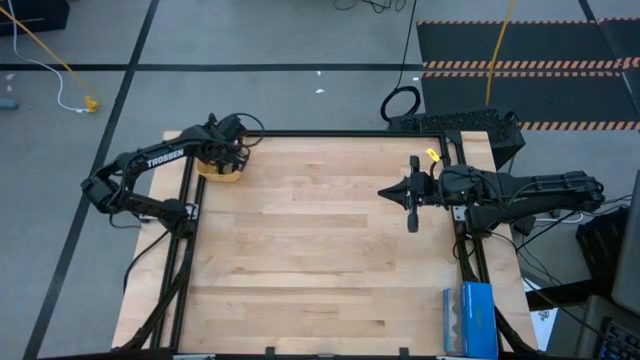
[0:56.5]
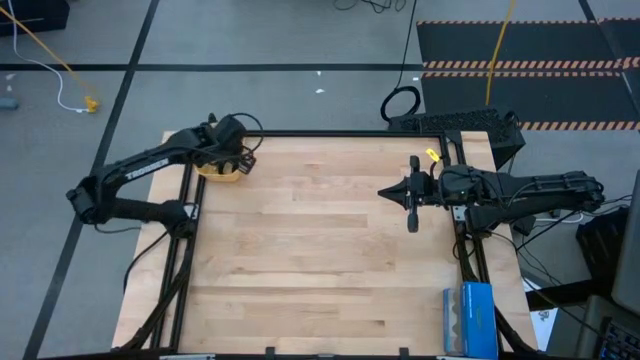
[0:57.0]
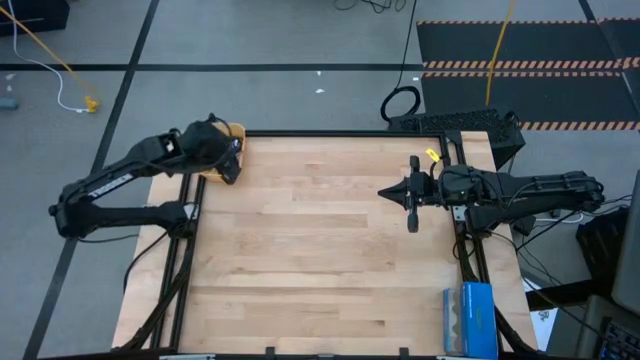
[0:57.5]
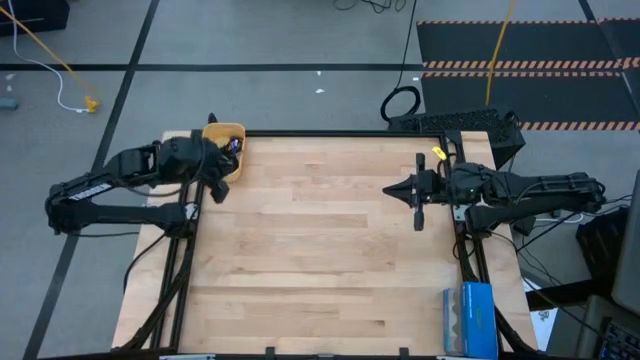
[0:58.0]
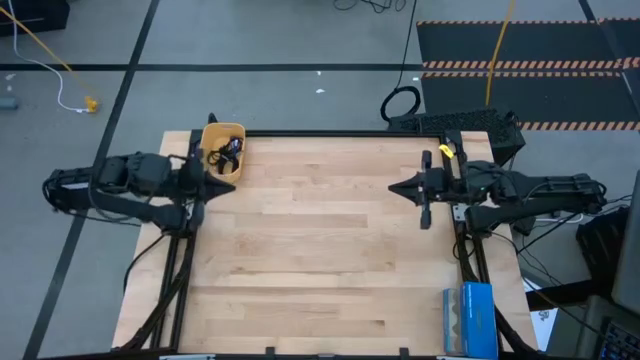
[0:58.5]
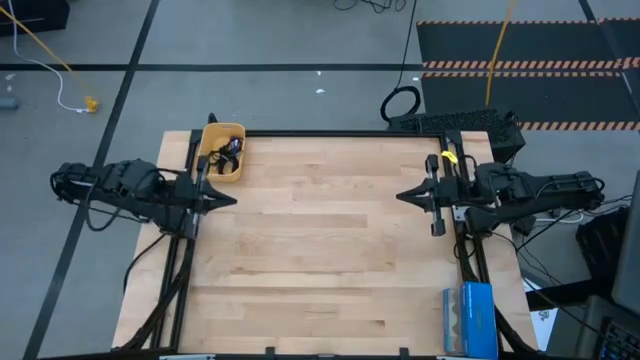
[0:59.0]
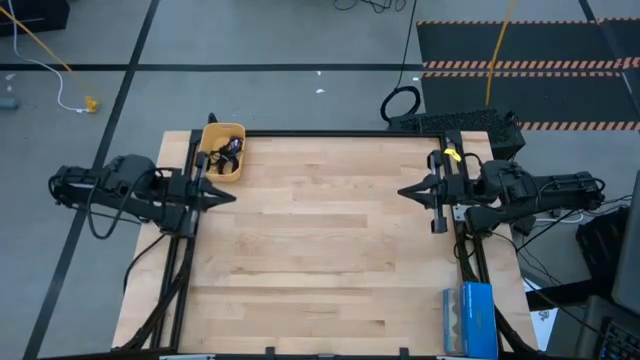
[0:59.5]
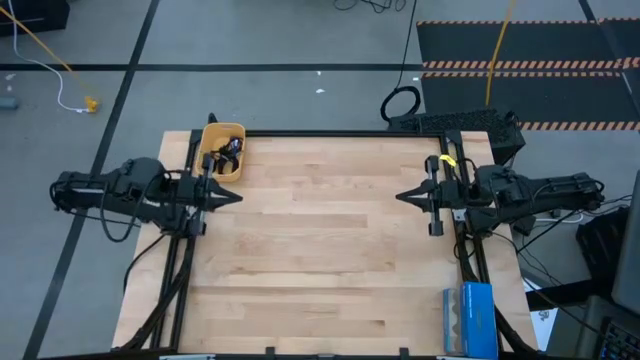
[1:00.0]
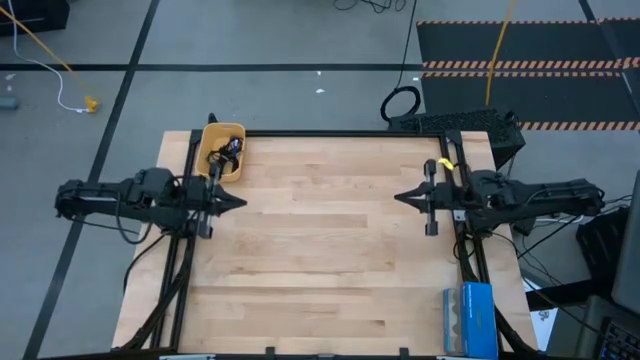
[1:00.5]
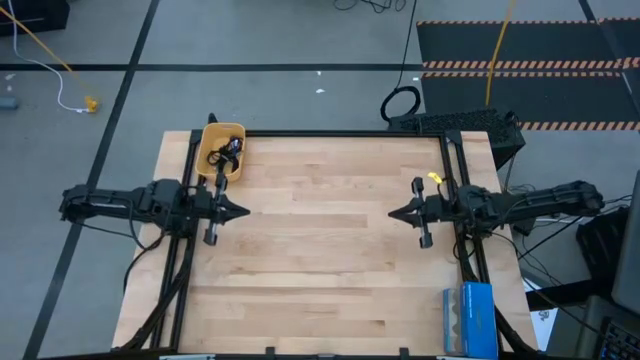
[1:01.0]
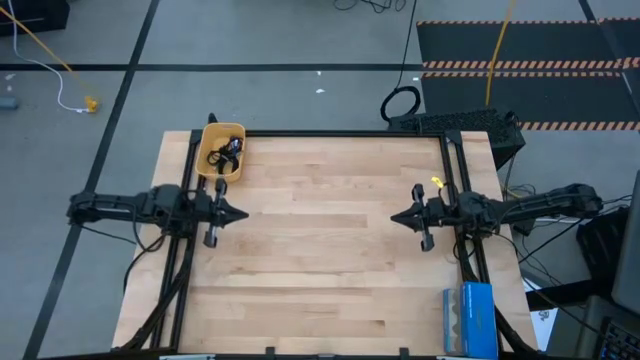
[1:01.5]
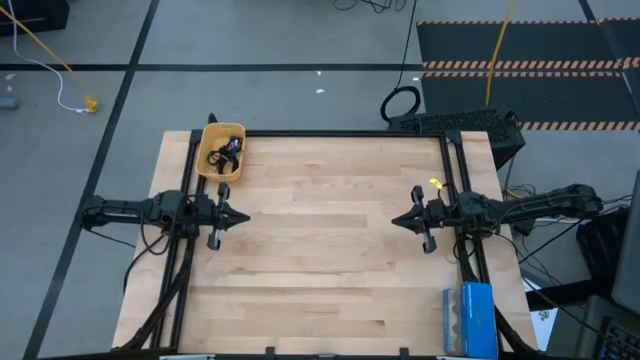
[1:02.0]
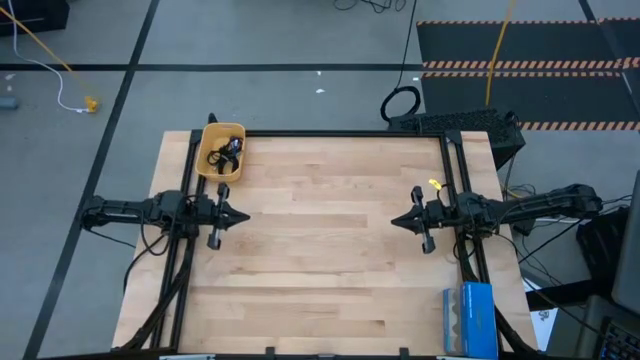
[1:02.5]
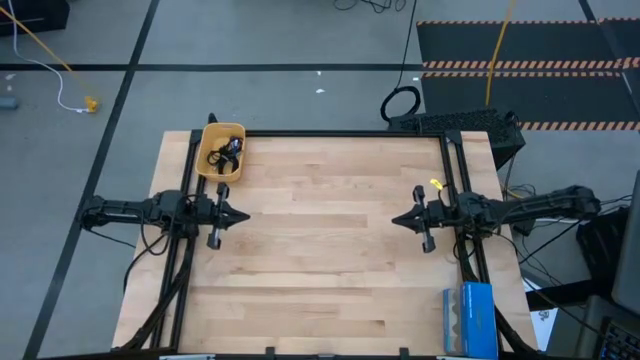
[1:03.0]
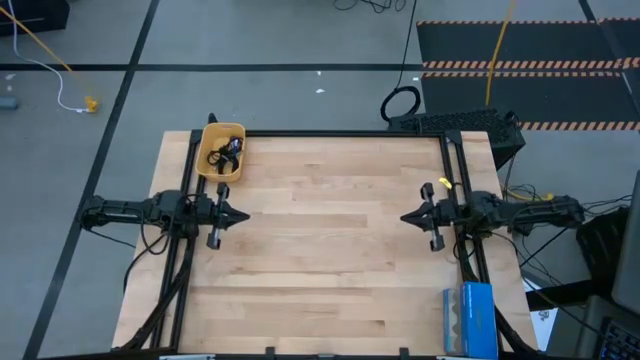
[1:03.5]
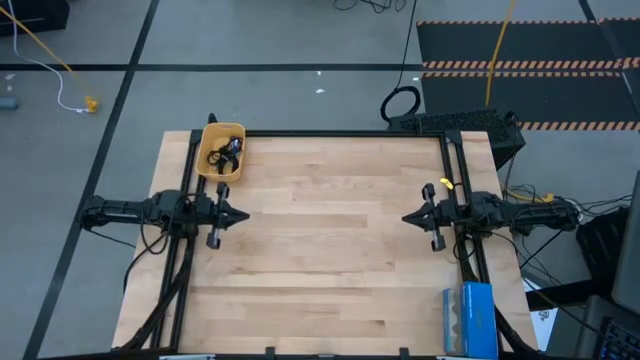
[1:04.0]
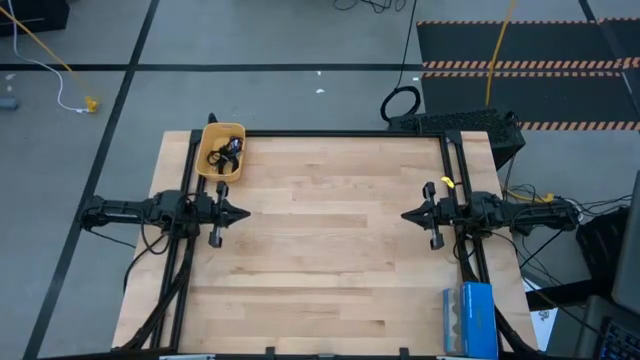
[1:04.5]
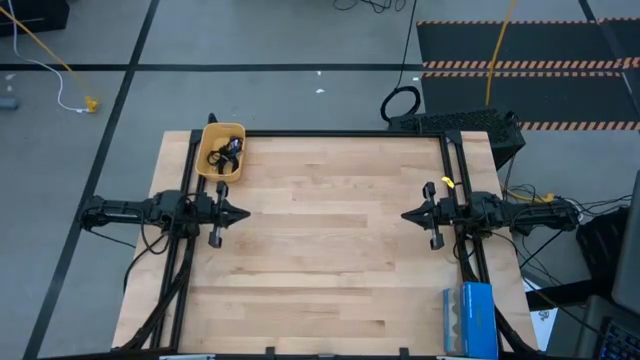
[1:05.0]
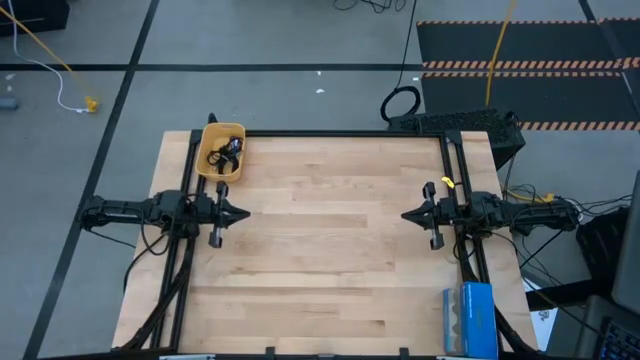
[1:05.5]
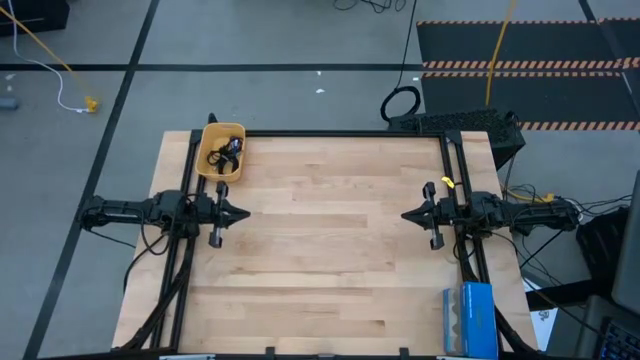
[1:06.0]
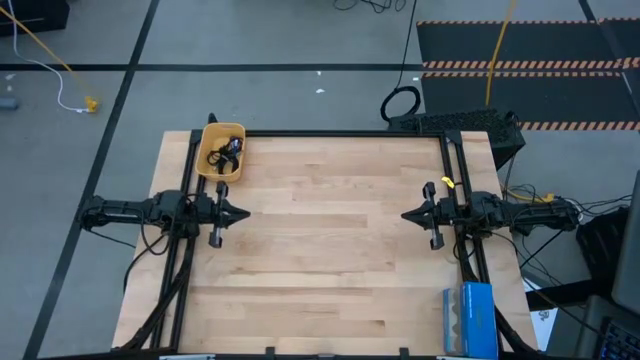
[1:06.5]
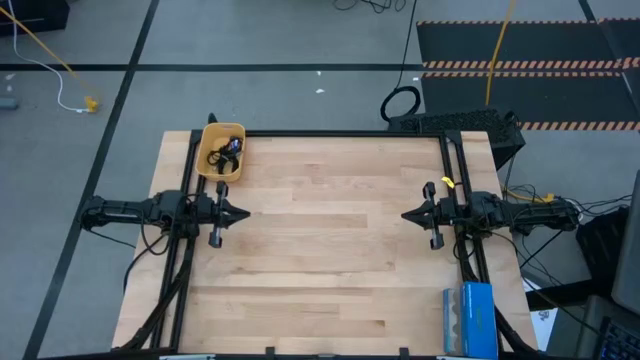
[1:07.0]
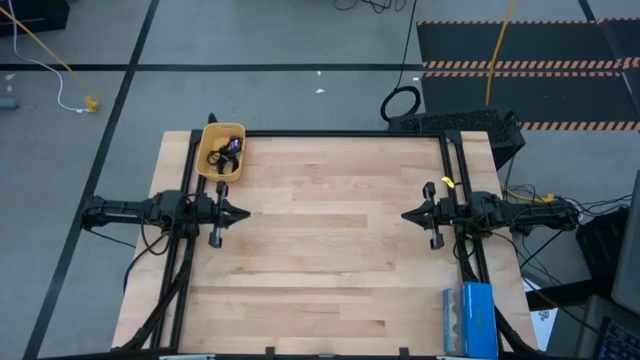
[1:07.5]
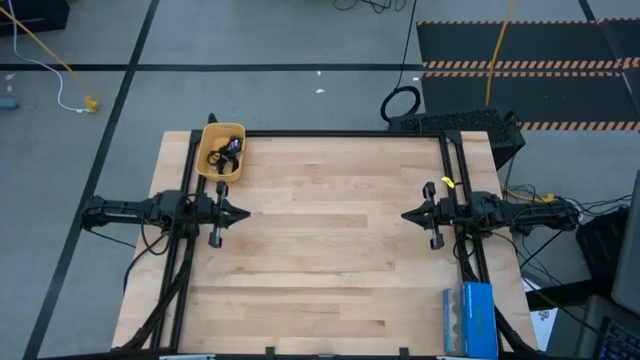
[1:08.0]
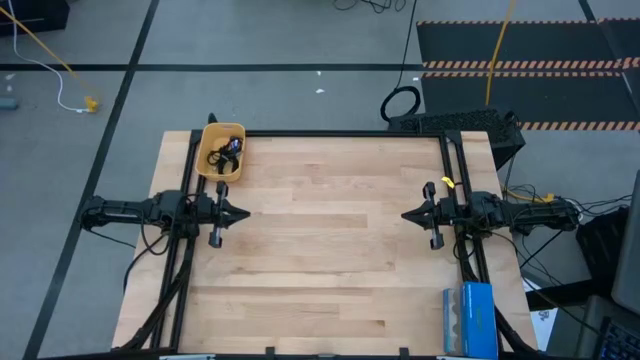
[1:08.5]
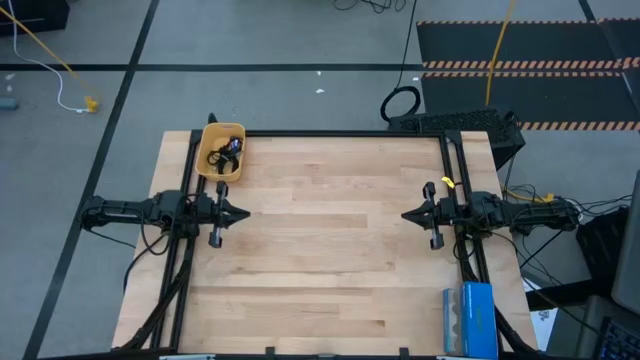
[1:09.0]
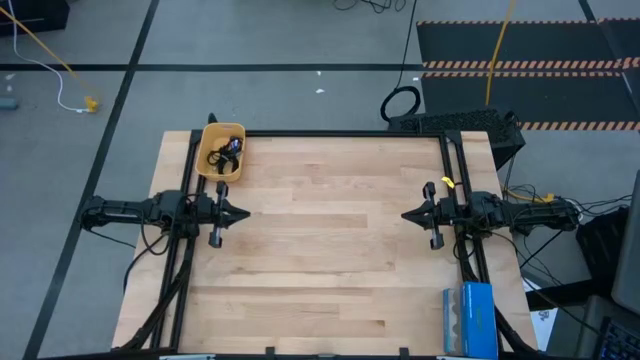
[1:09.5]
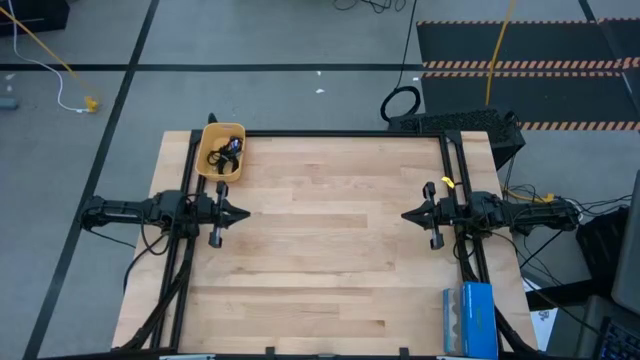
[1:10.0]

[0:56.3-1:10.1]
Task: Pick and place USB-C Cables
Return to Home Position
